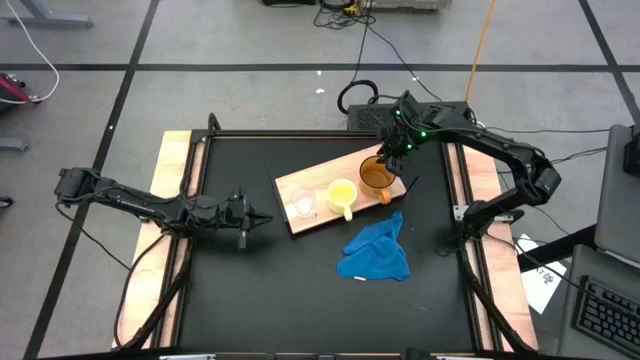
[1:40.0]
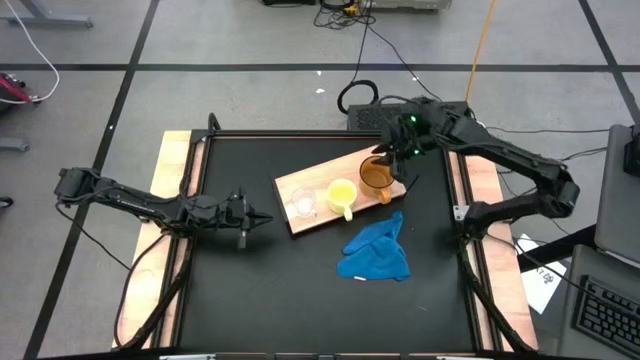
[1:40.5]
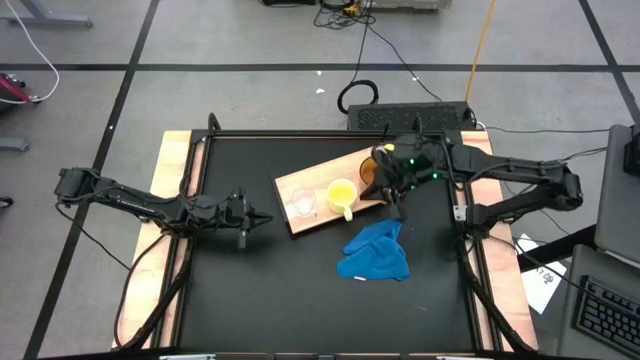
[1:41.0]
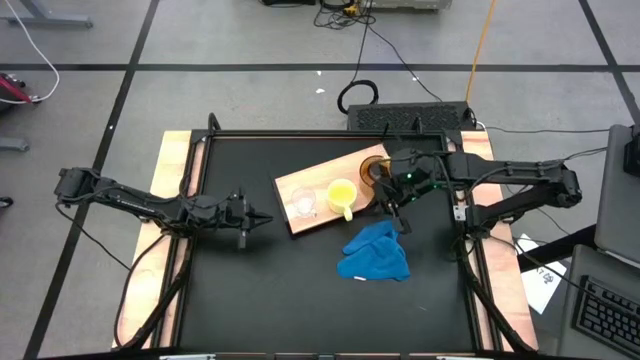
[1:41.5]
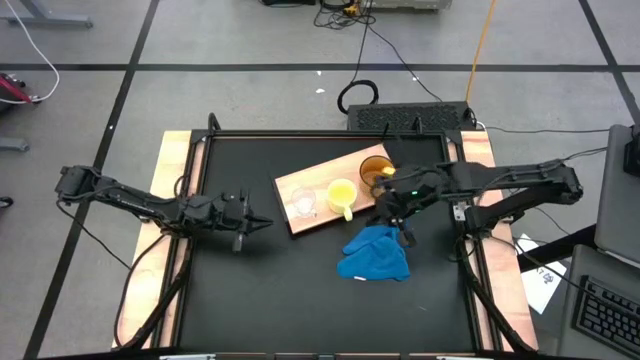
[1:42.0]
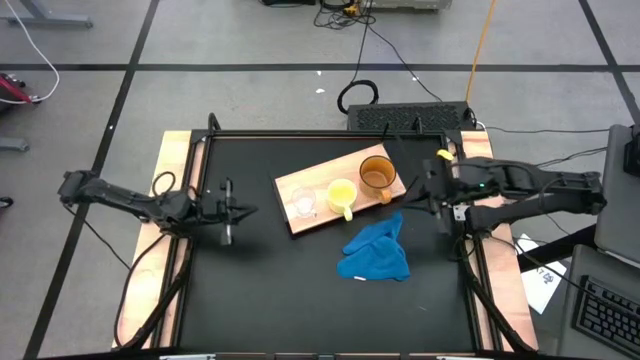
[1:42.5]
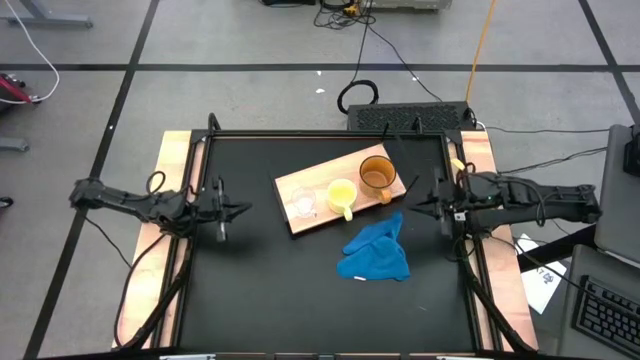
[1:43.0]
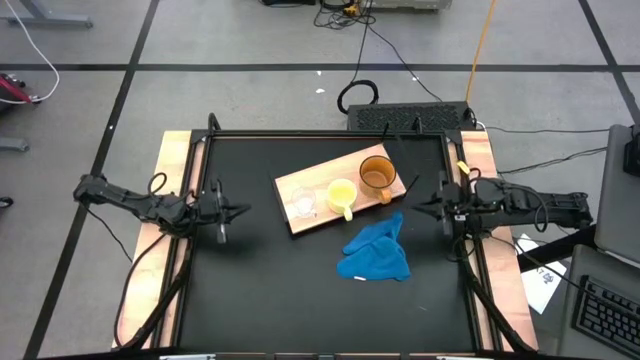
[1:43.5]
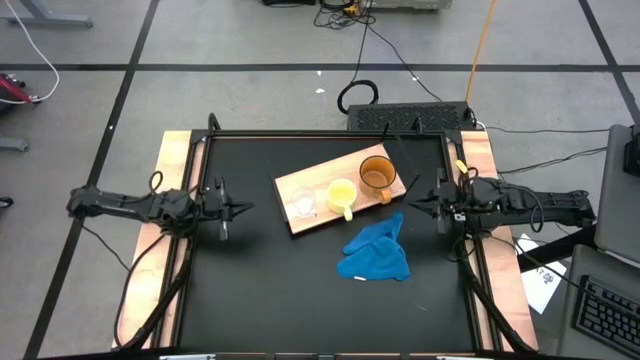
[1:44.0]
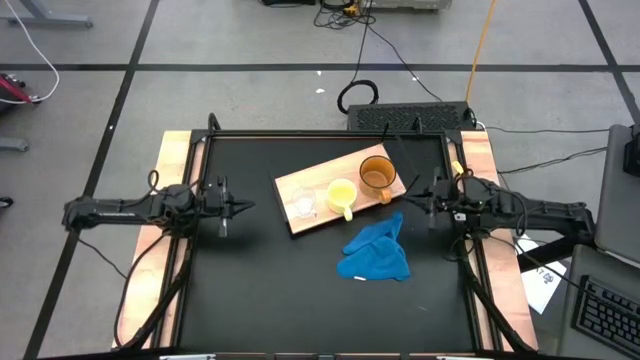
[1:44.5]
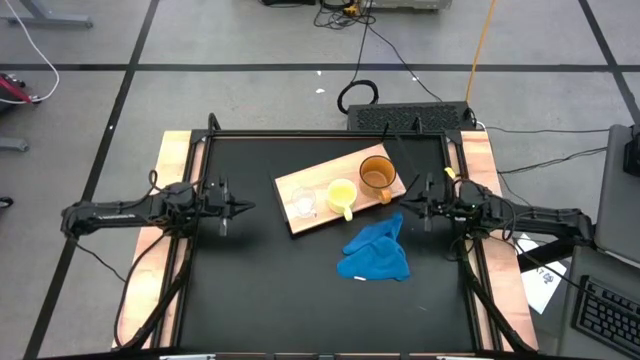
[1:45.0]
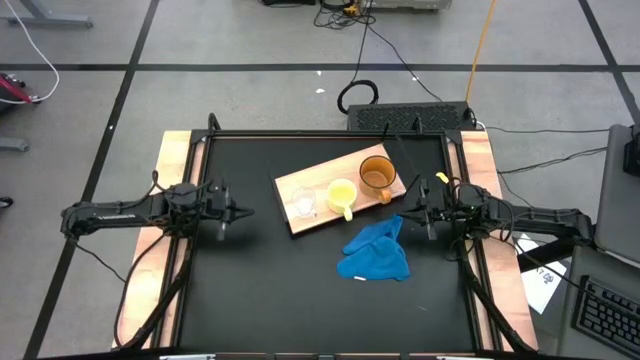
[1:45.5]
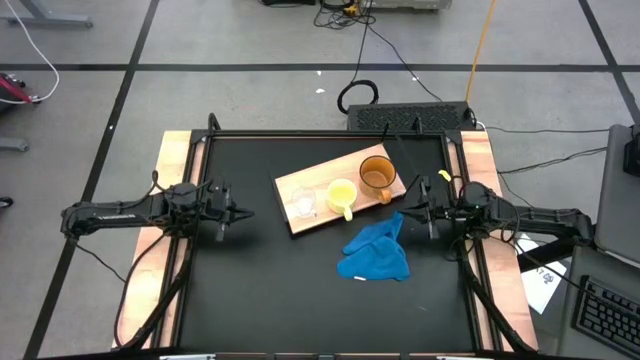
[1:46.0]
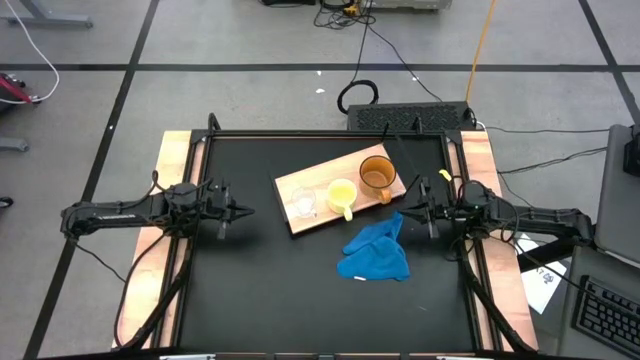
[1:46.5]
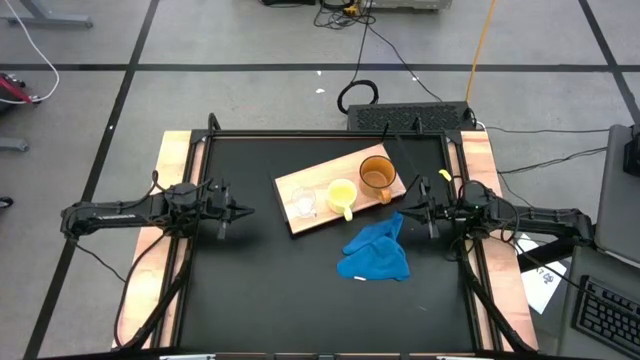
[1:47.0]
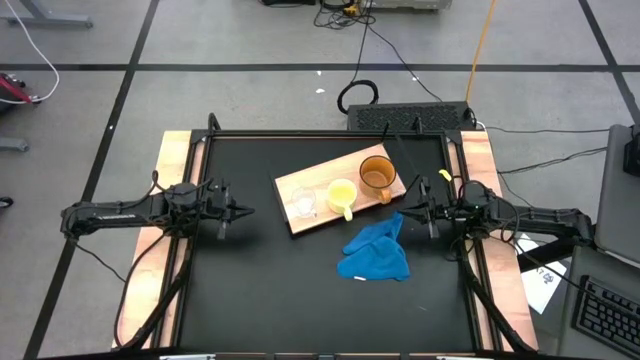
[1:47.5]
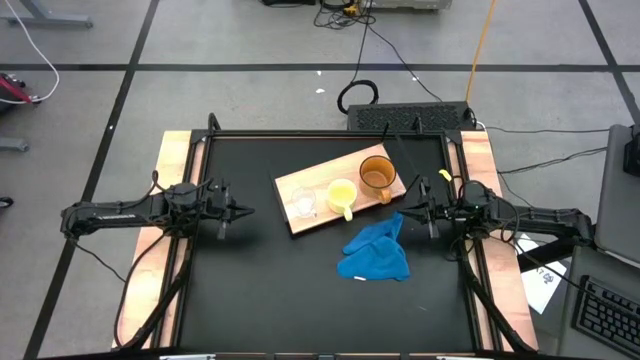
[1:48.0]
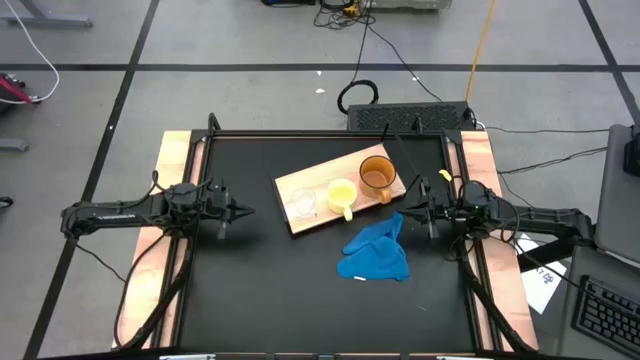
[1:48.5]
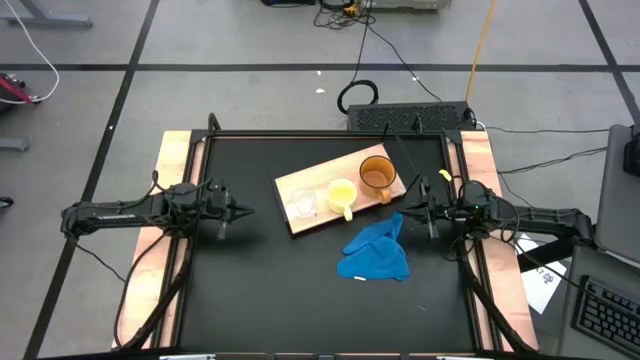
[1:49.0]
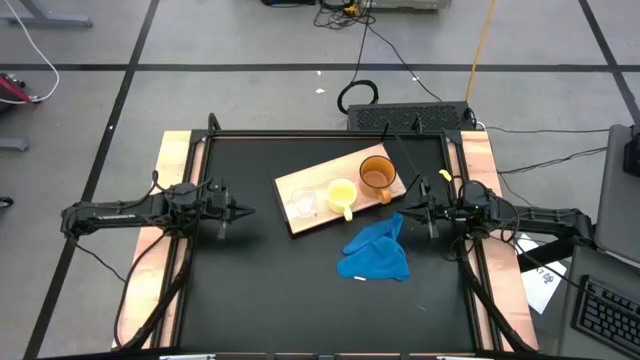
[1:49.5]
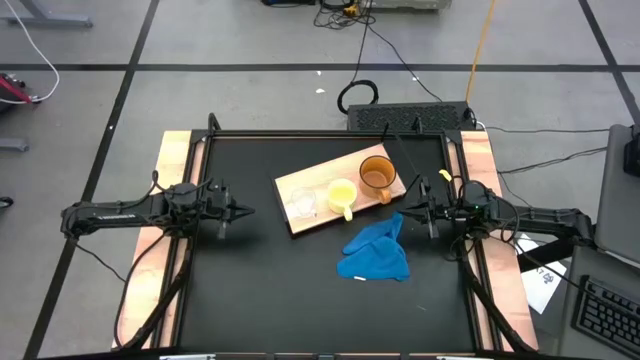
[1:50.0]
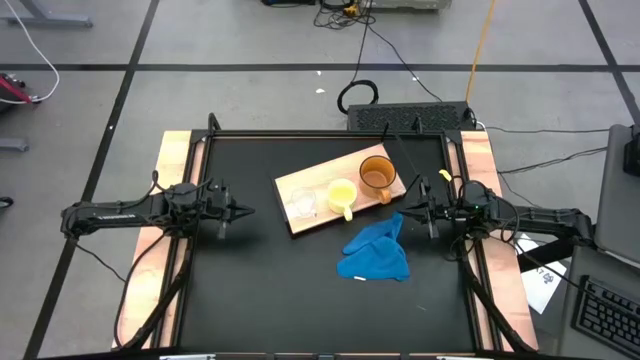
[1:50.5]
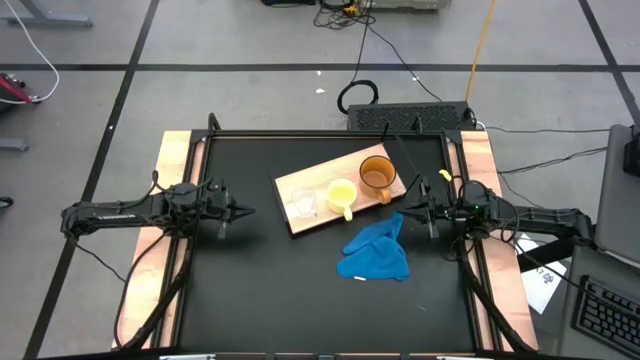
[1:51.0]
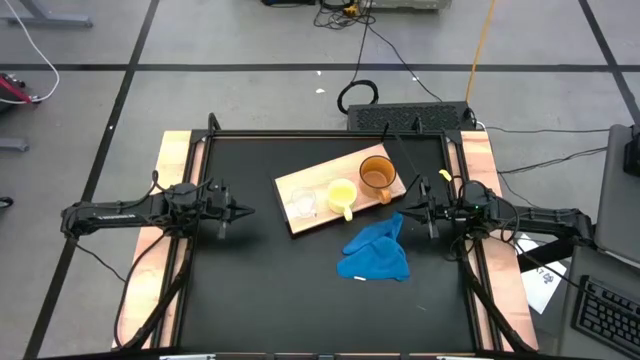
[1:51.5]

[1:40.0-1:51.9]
Task: Stack small to large cups/mugs on shelf
Return to Home Position

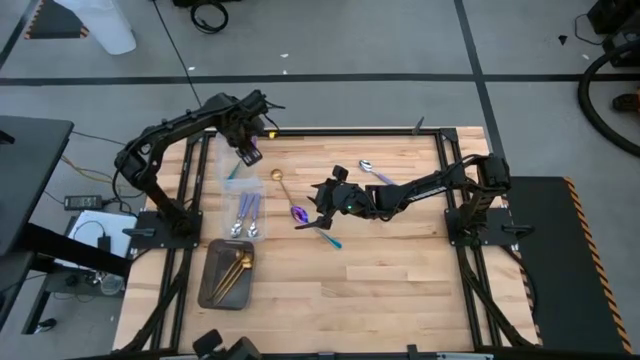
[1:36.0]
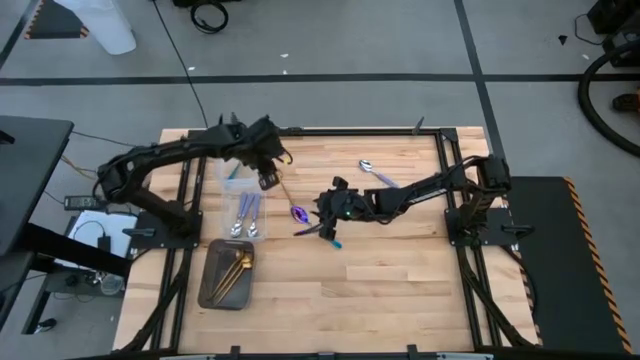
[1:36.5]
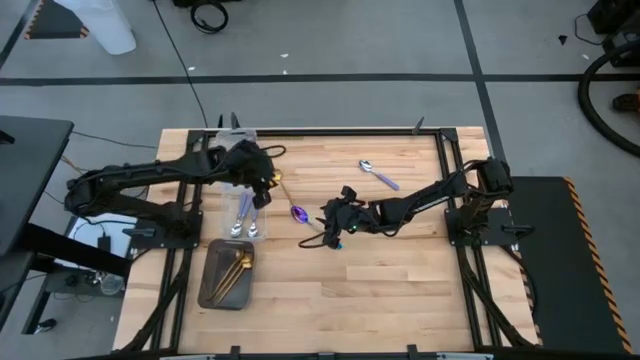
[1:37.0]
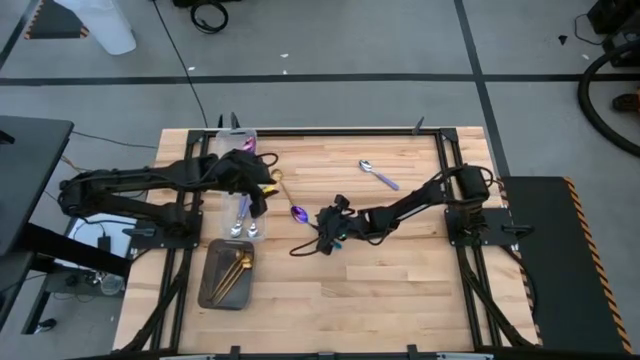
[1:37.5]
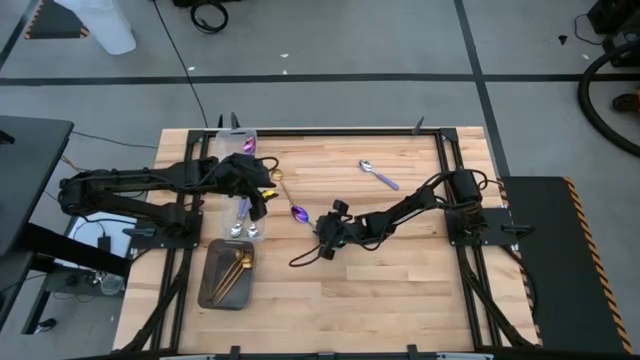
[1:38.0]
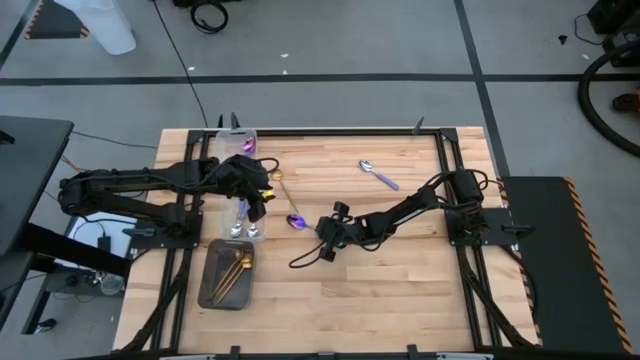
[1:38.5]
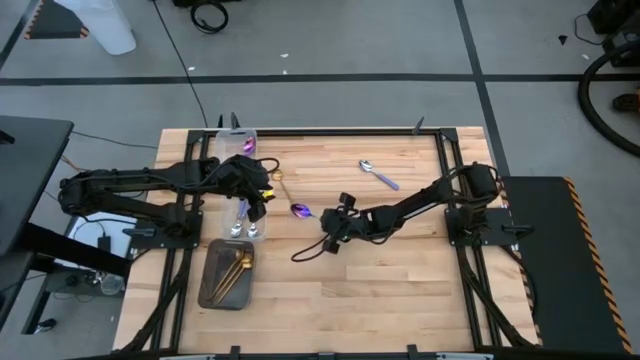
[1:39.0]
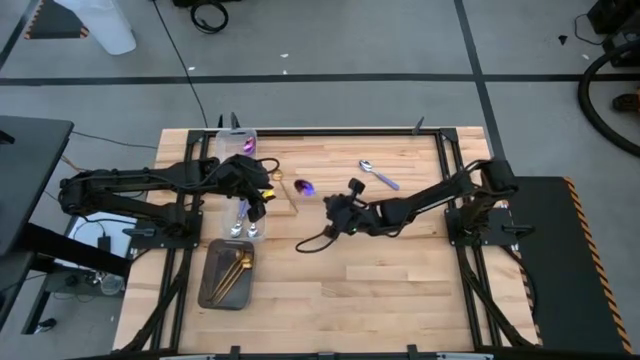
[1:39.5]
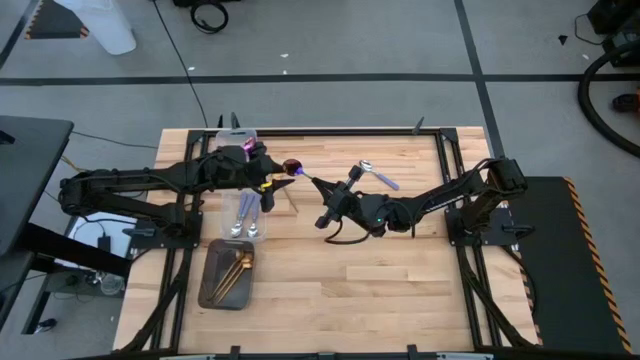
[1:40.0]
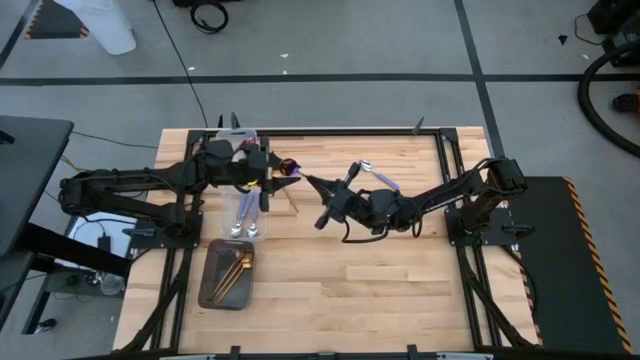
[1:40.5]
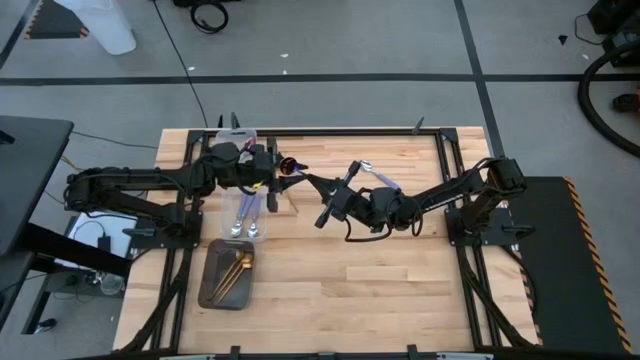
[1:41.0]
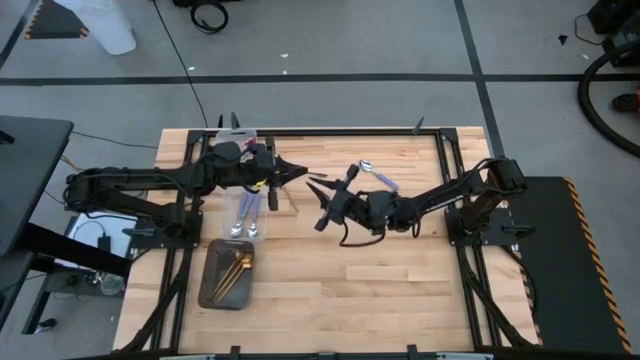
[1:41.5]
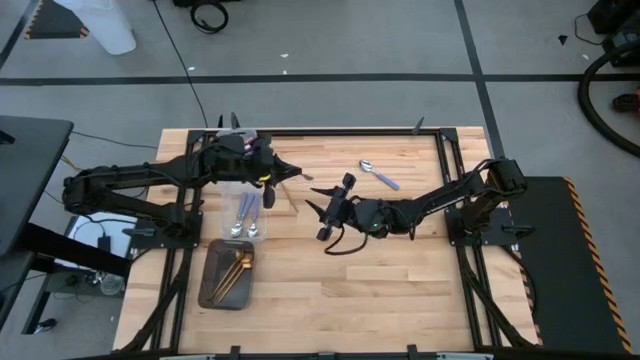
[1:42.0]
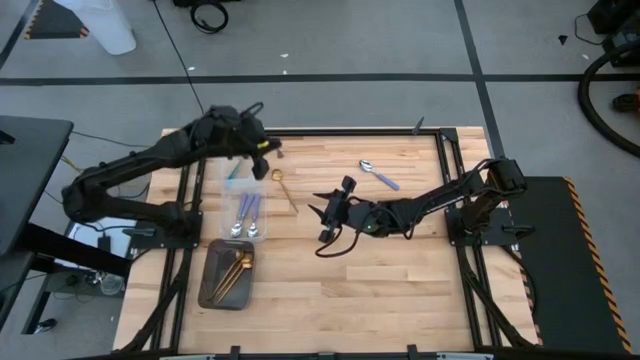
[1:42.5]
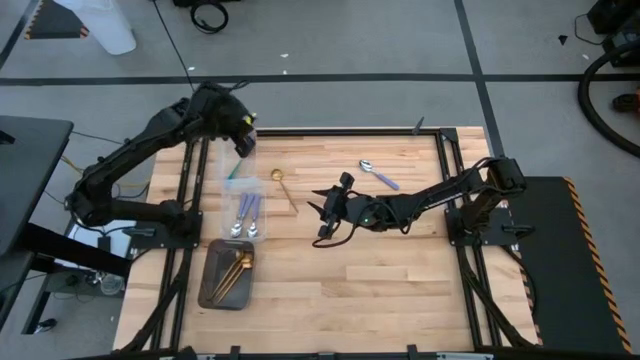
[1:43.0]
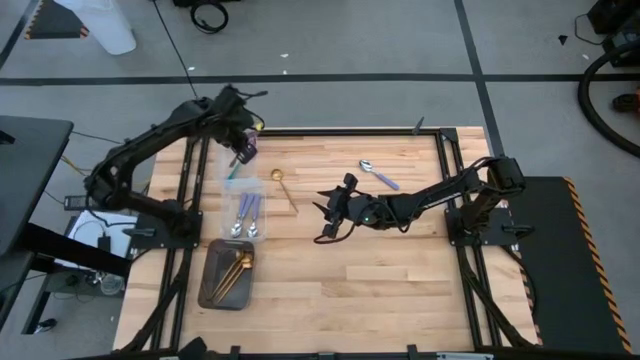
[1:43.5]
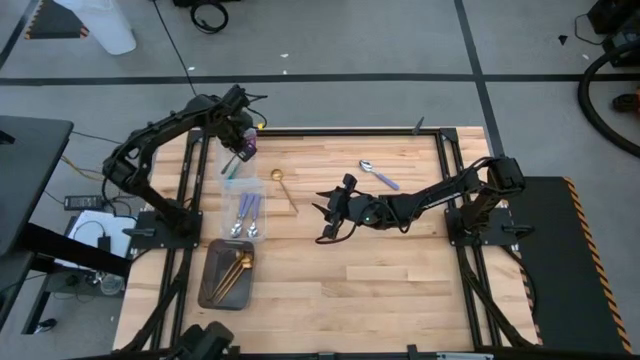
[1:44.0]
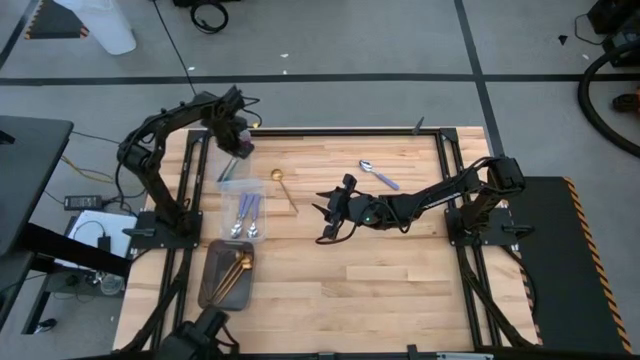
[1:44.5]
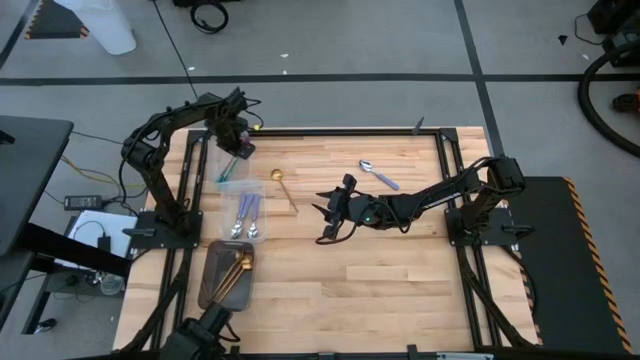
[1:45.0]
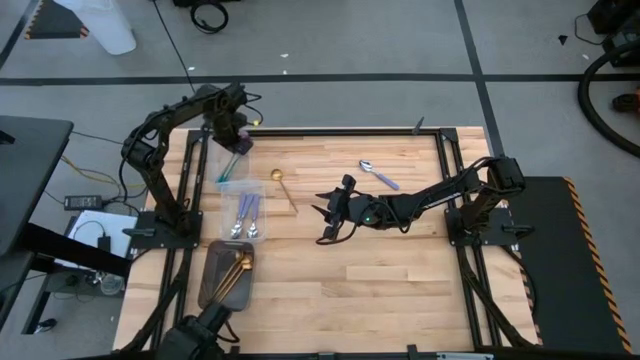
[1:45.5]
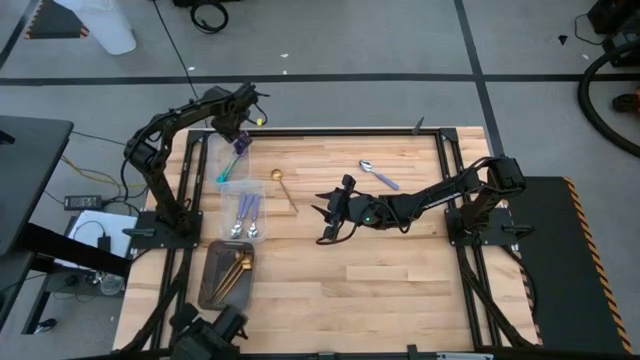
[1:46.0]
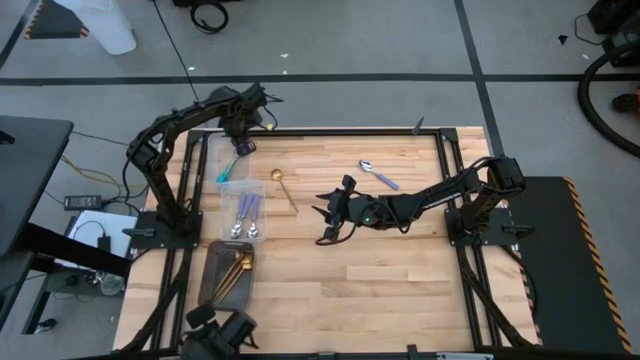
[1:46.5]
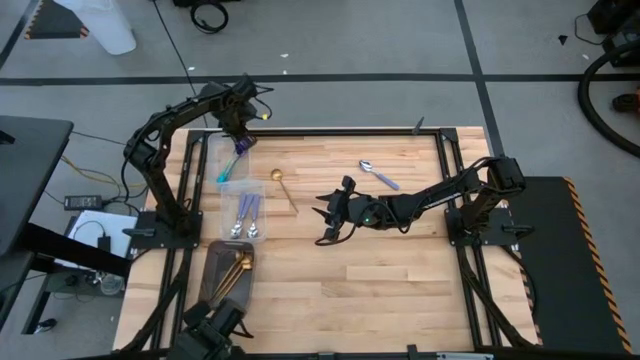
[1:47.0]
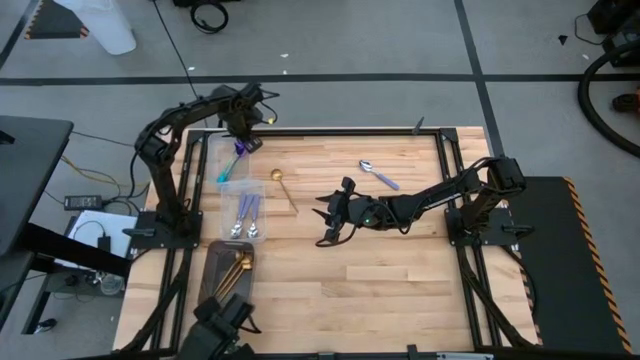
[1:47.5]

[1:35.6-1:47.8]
Task: Sort silverware by color (type)
Put the purple spoon into the top transparent bin
